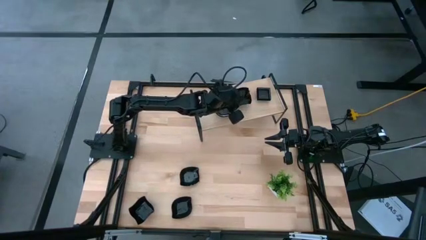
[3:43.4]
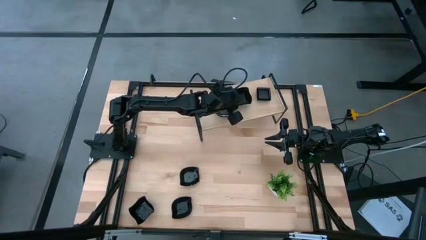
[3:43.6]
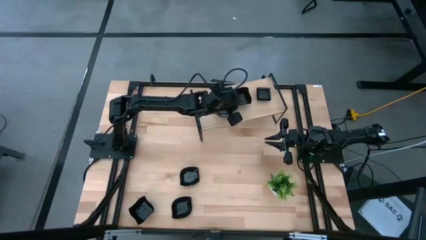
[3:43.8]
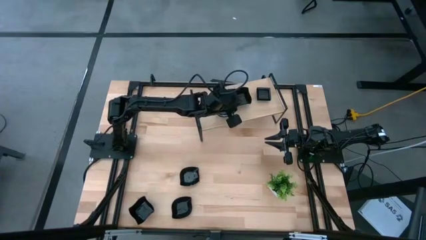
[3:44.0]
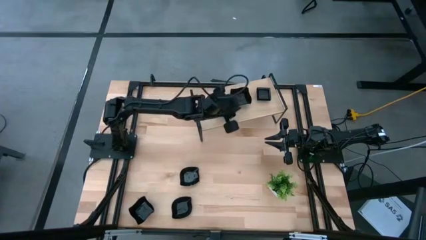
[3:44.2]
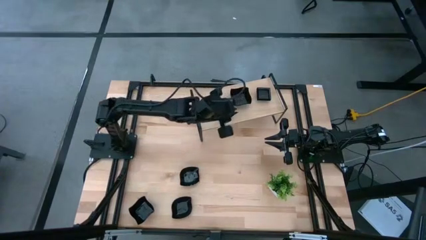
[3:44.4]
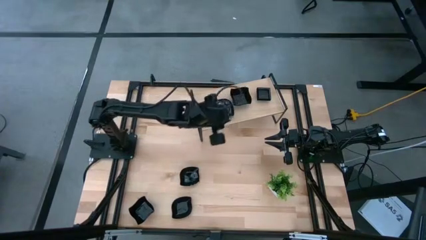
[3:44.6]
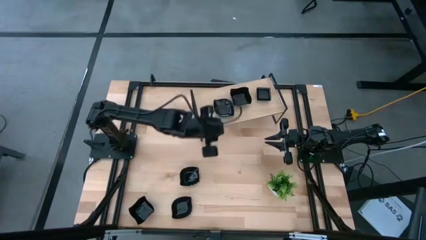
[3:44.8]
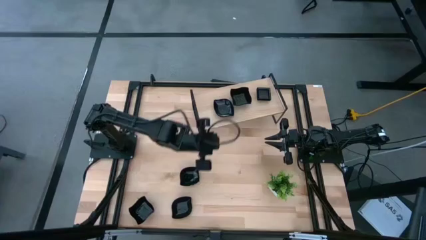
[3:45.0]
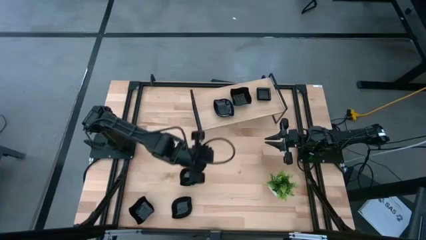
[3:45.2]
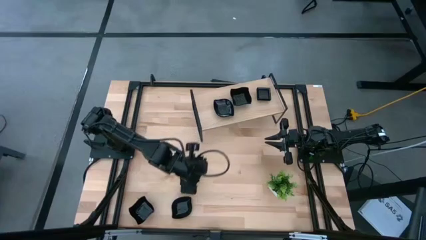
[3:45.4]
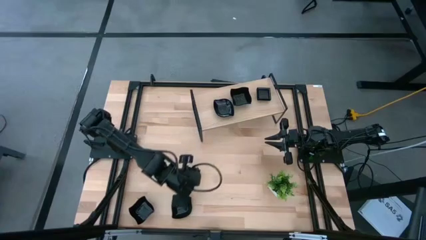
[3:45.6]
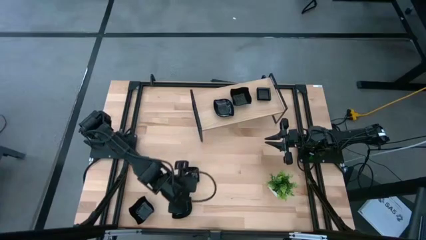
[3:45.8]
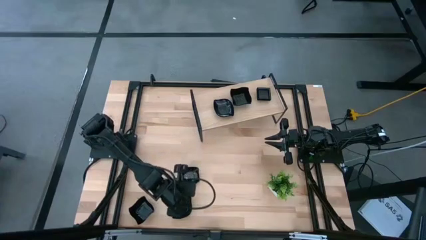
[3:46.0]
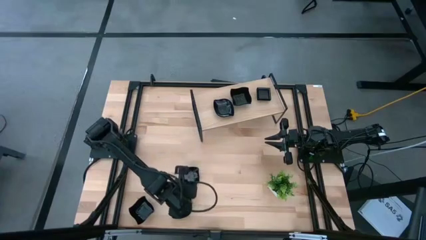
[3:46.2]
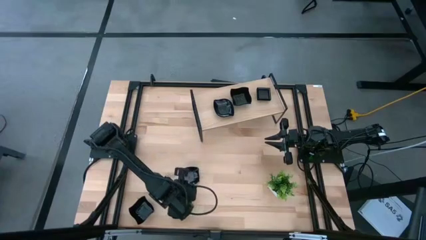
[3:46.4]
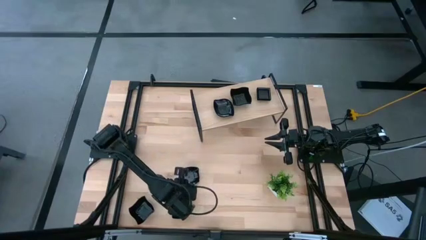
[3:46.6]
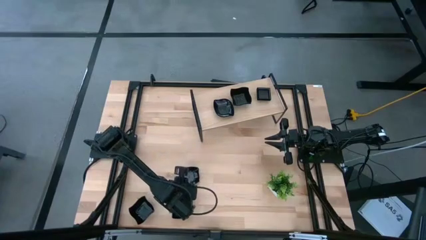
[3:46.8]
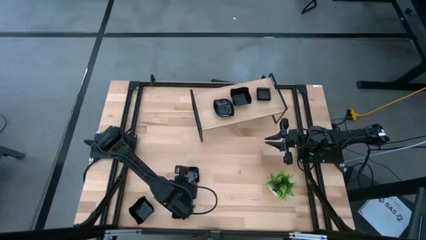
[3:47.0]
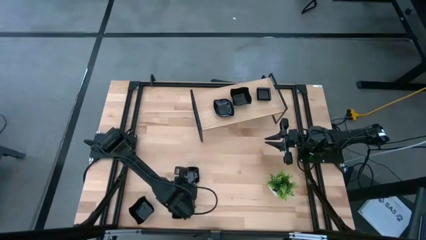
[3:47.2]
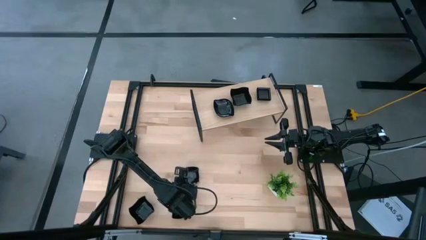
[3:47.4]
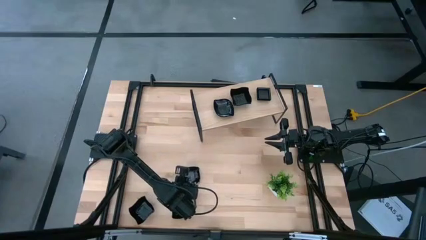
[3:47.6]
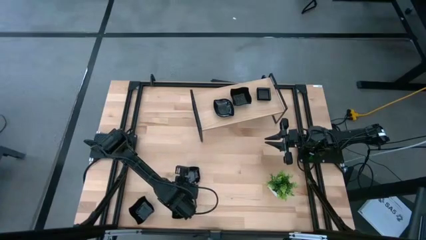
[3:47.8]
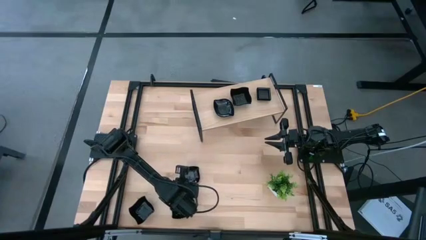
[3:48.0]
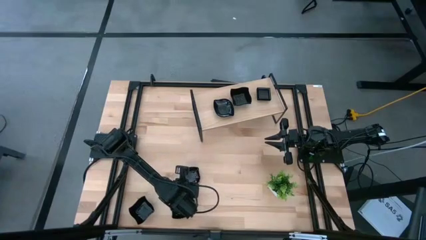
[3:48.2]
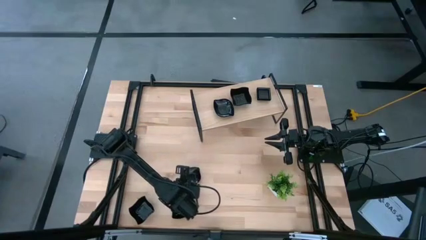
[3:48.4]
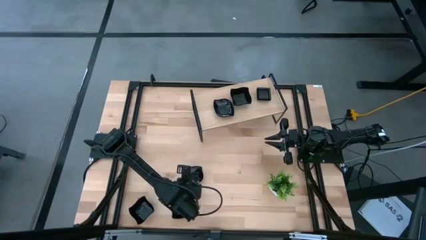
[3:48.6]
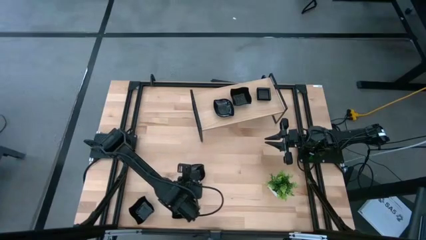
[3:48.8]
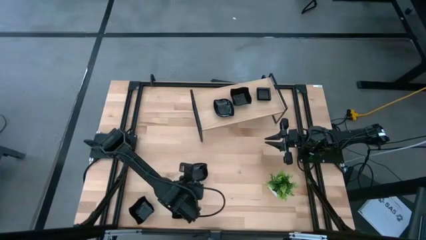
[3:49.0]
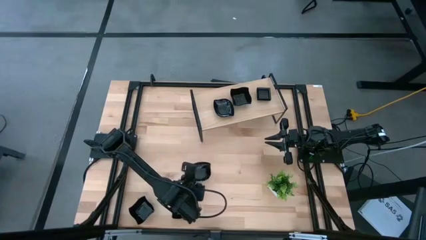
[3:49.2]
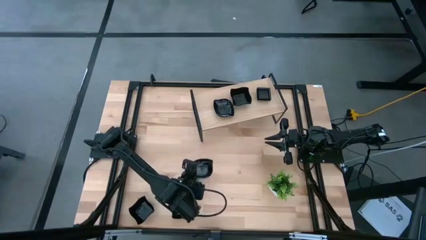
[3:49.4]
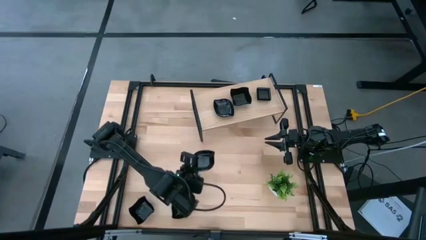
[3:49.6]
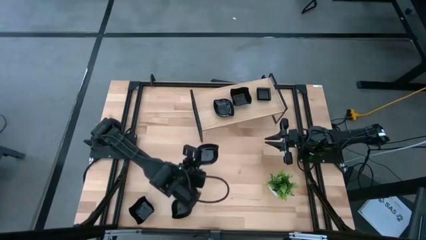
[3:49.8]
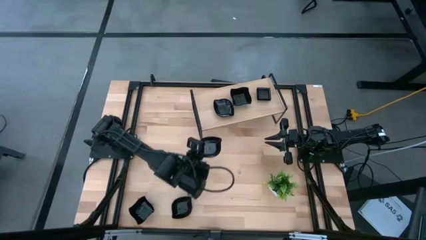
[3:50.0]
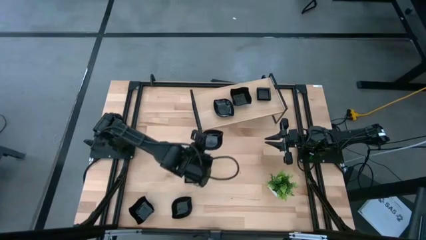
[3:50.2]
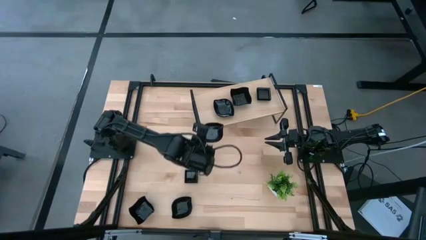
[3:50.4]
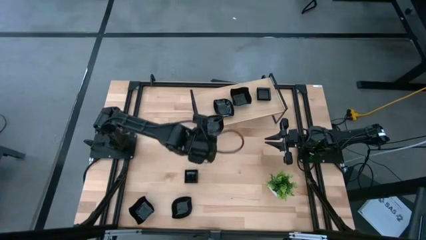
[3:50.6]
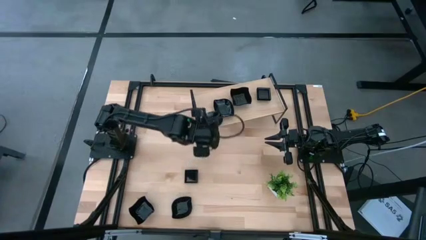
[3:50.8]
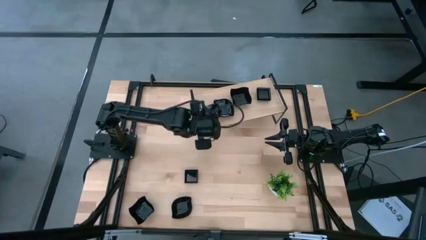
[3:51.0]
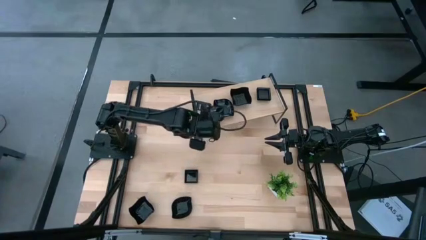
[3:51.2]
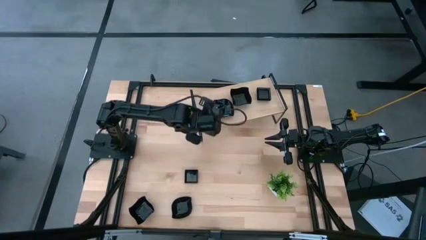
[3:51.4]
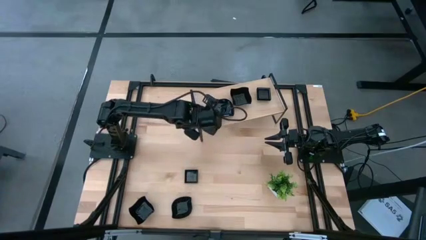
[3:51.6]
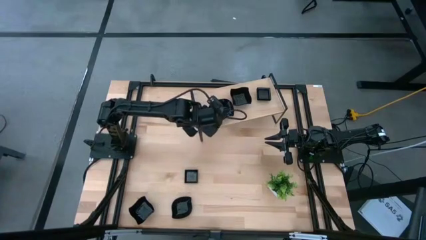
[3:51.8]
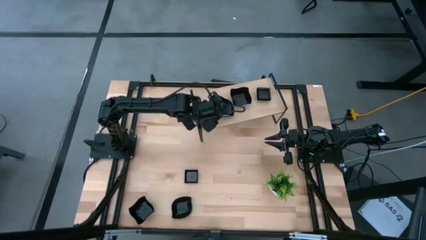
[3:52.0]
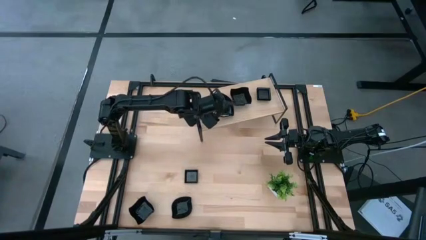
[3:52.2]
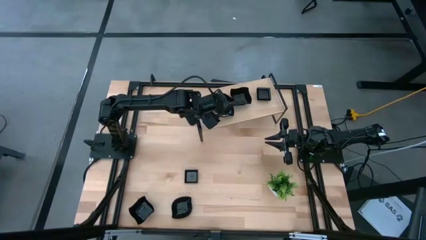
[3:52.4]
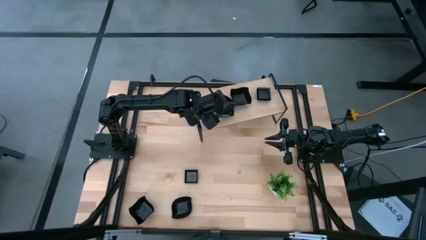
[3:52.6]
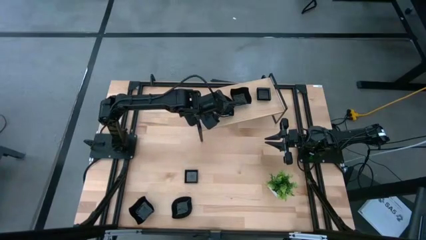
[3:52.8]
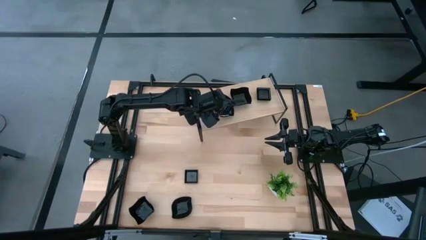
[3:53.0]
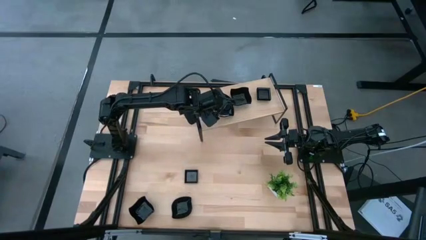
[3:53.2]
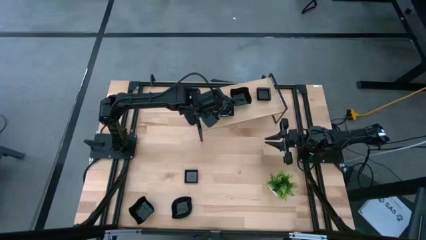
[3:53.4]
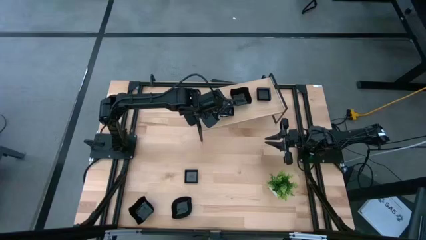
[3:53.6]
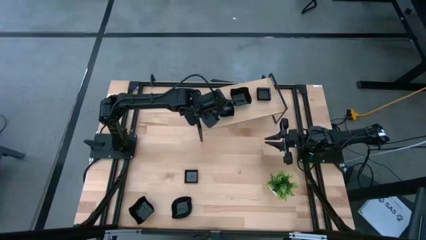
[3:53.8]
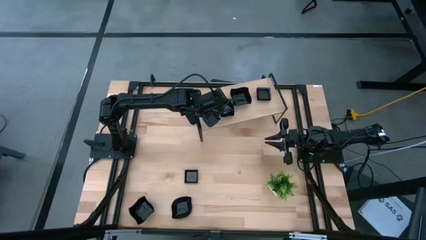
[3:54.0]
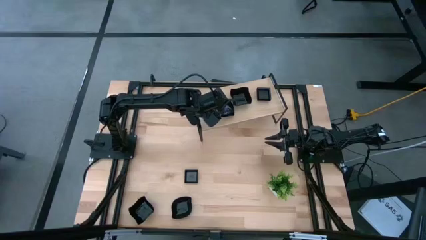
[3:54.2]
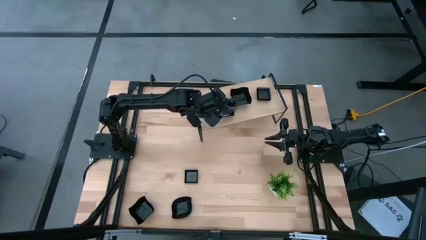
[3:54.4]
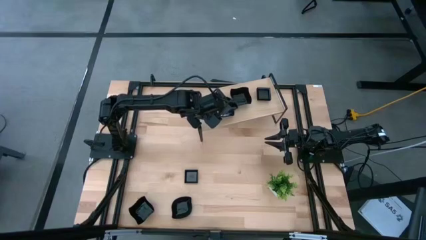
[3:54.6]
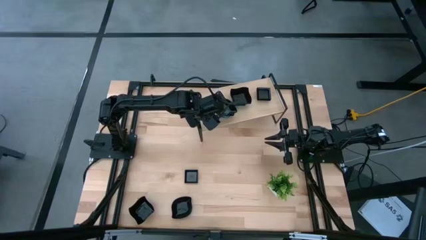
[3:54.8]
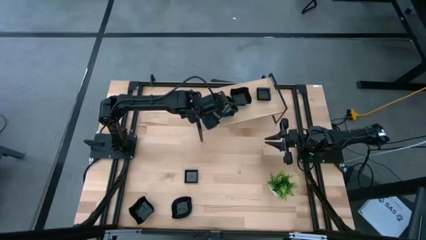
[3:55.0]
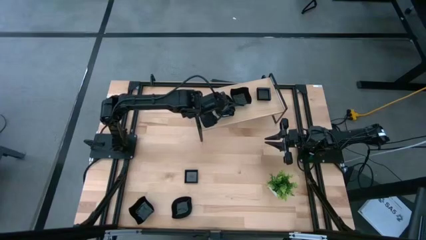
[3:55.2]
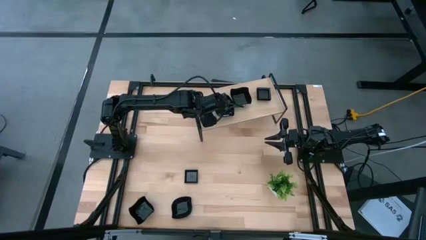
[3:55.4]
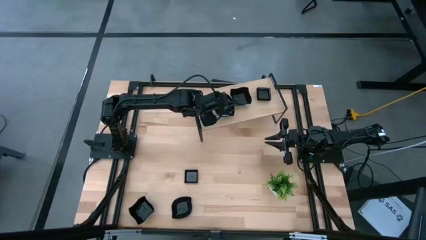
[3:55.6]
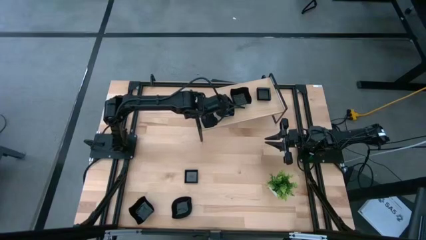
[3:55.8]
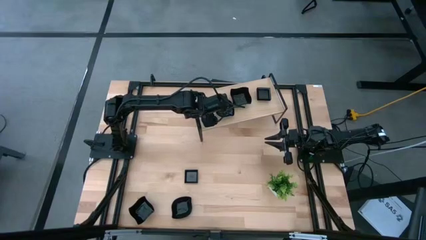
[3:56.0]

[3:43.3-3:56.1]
Task: Pick & Place Mini shaped plates
Stack the leaf-shaped plate on top of the leaf-shaped plate on the shelf

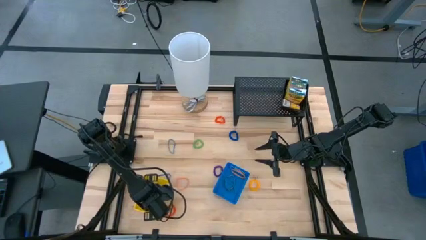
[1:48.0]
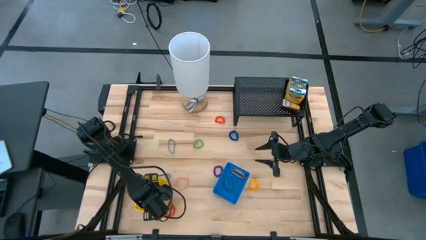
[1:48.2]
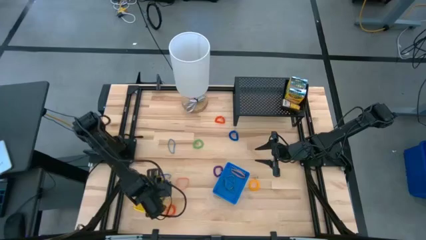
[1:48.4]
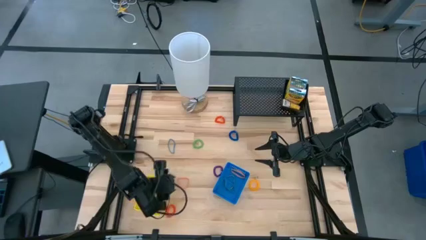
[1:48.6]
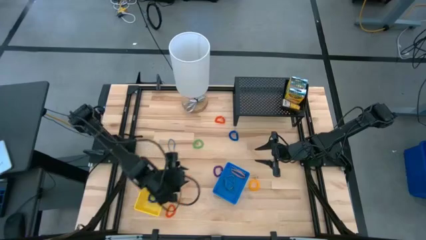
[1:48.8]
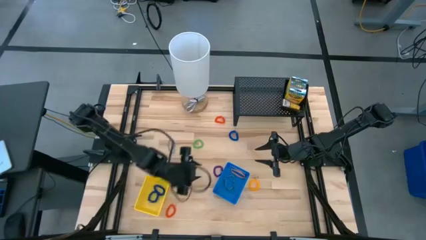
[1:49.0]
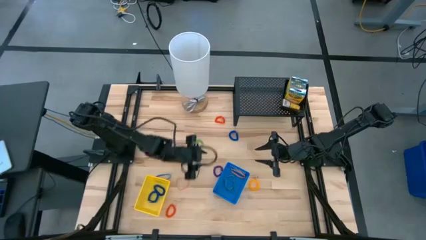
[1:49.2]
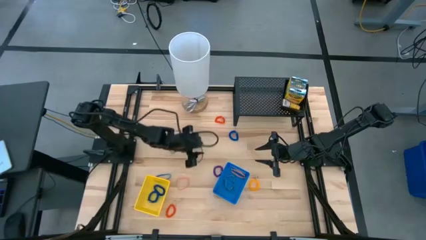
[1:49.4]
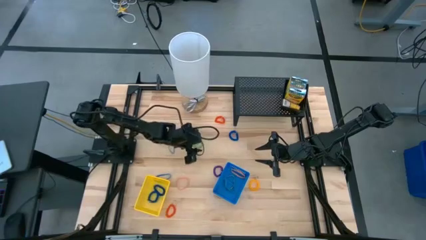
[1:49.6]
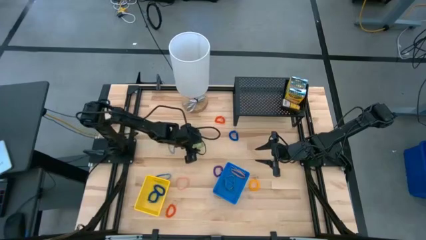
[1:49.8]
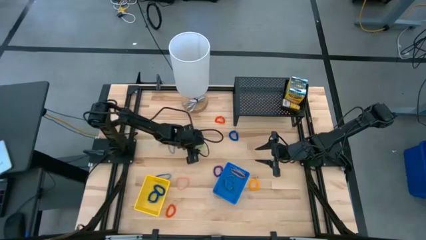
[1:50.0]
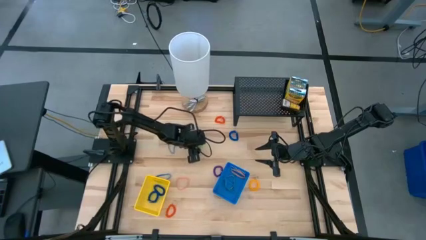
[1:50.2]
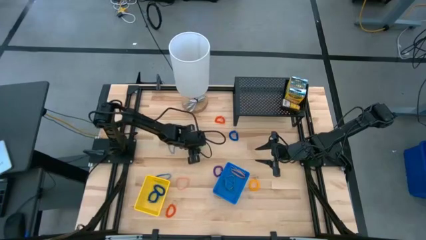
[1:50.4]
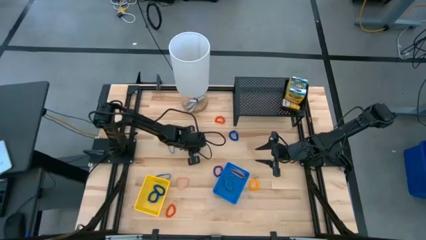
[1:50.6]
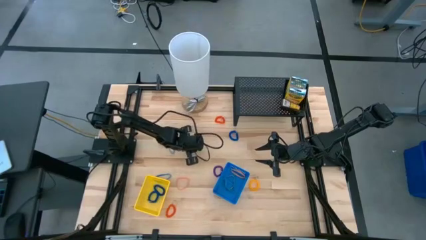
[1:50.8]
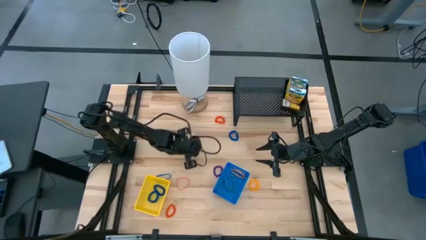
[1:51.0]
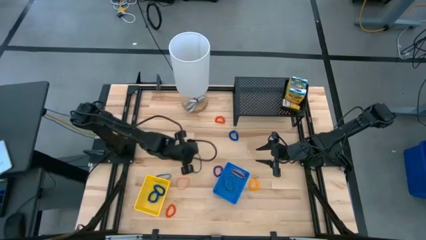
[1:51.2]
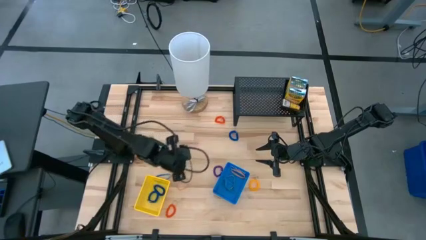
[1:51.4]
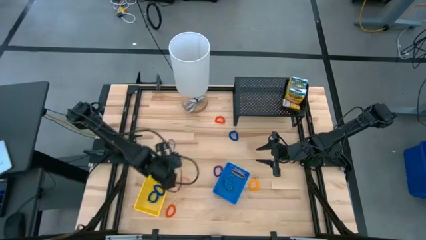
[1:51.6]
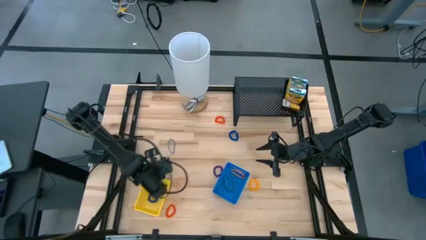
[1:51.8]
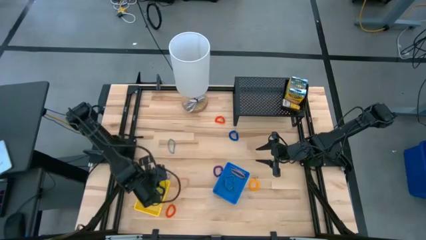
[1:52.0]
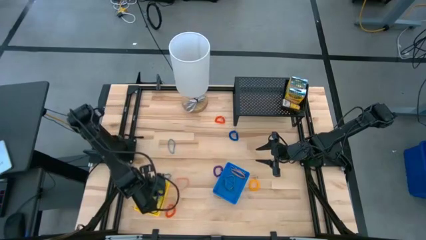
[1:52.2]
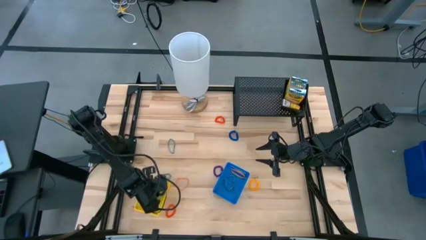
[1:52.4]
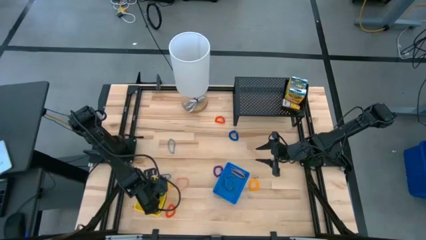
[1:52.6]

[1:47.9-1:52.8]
Task: Pick & Place Office Desk Supplies
Put the green spring rubber band into the yellow bin
